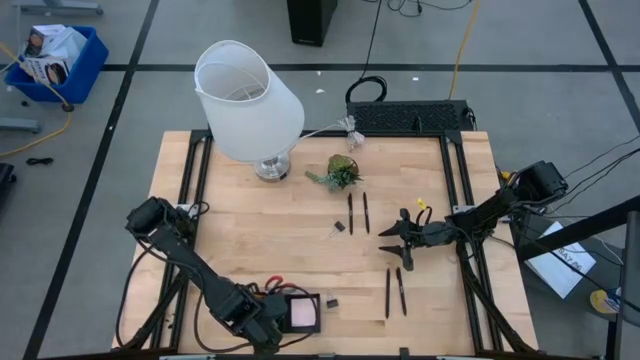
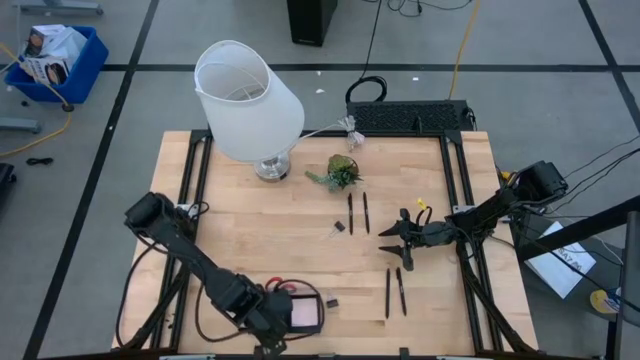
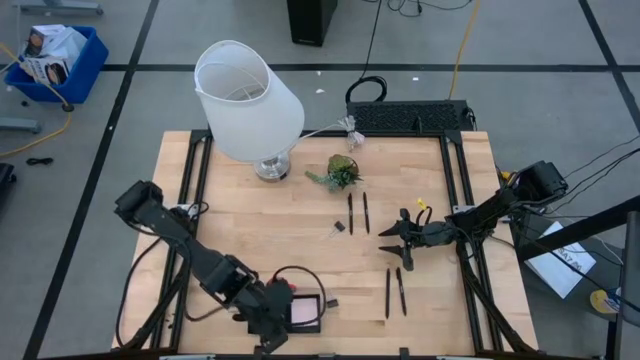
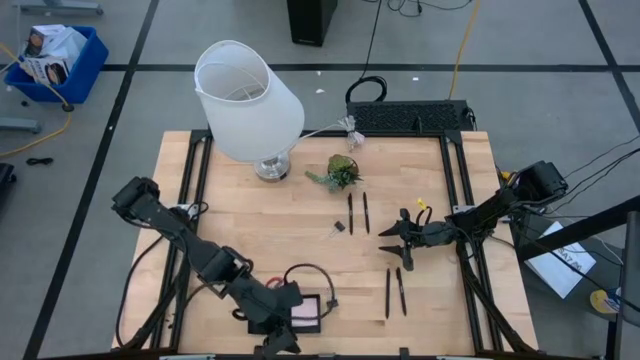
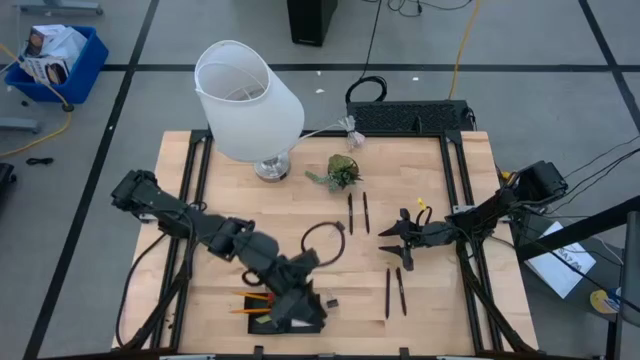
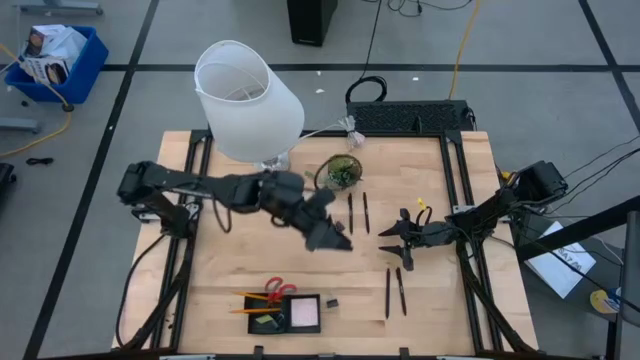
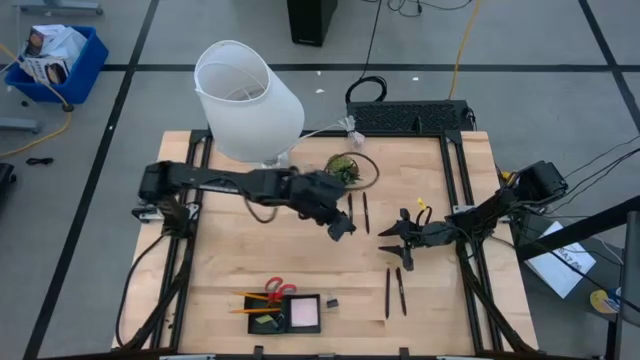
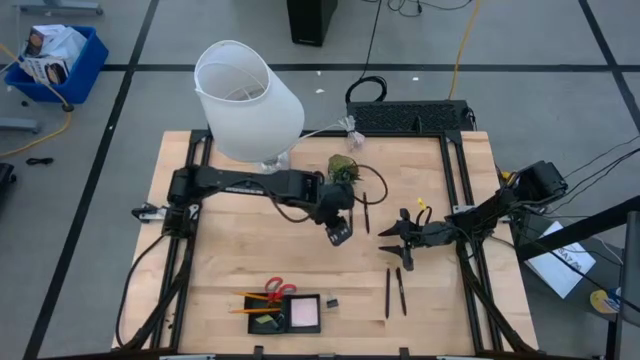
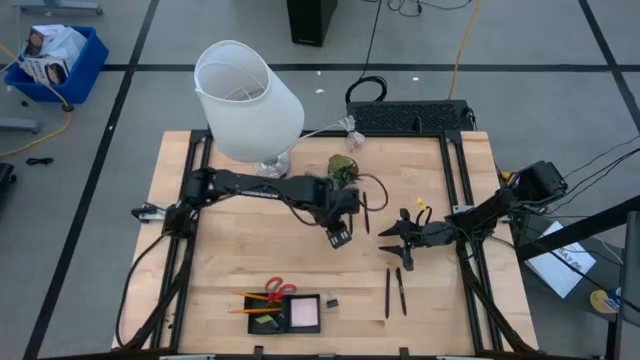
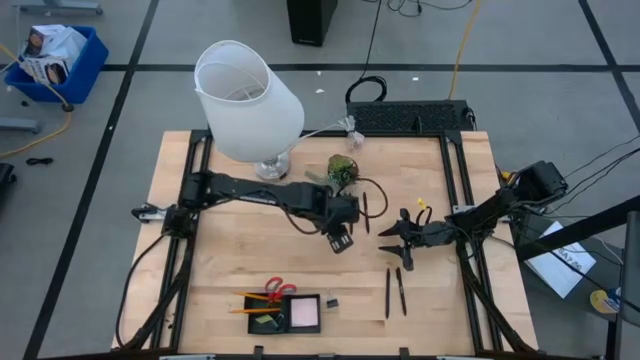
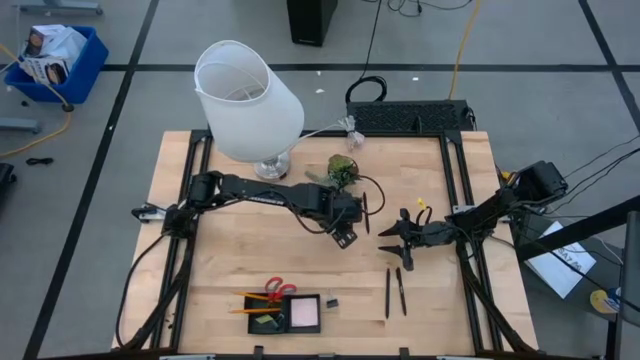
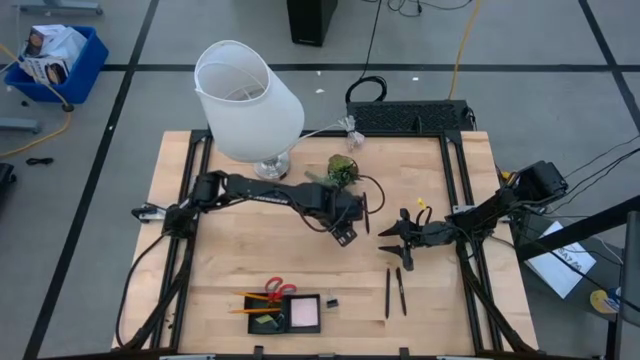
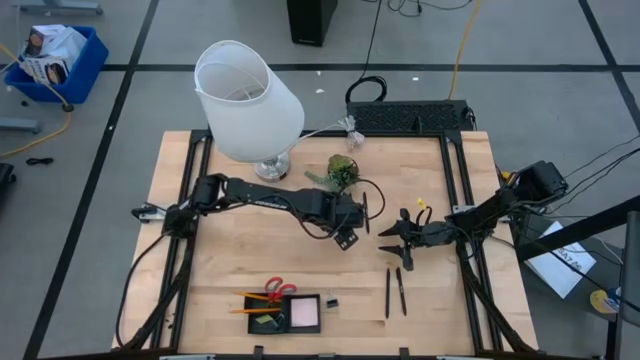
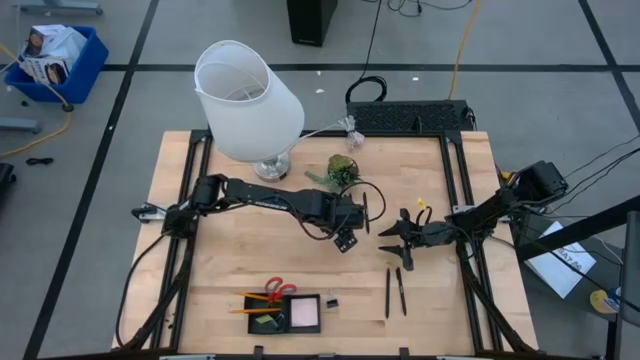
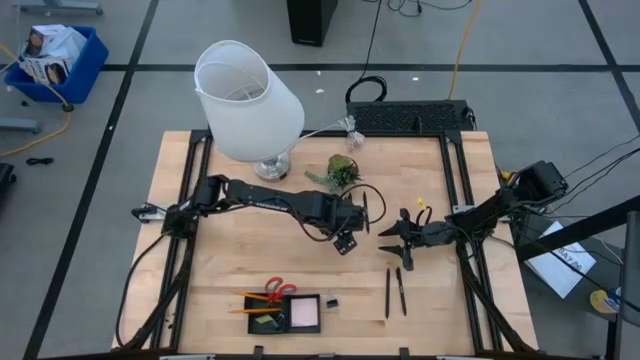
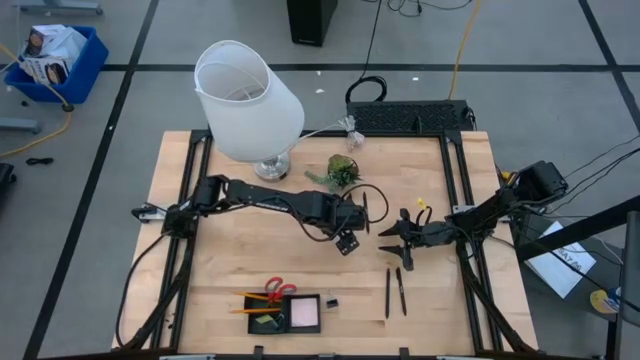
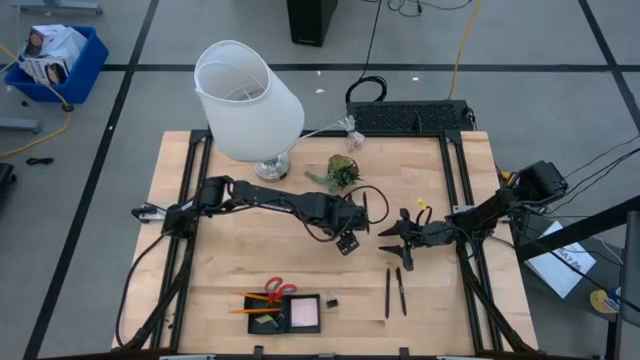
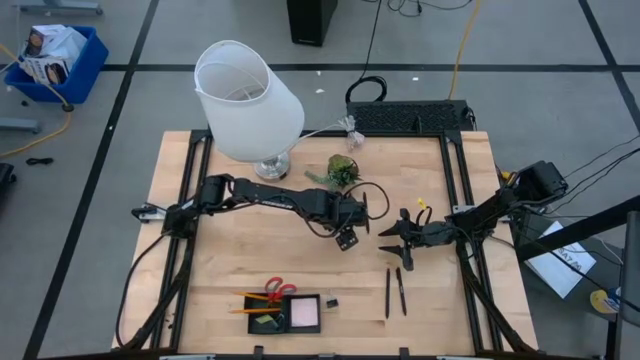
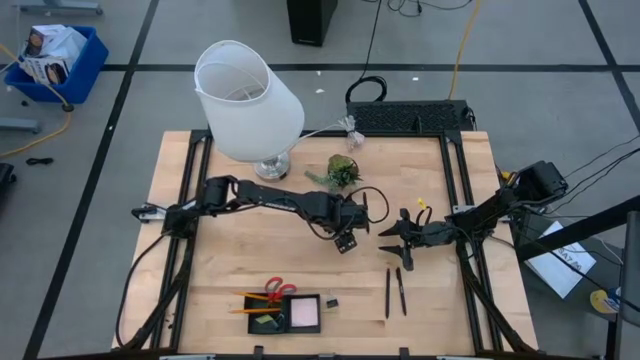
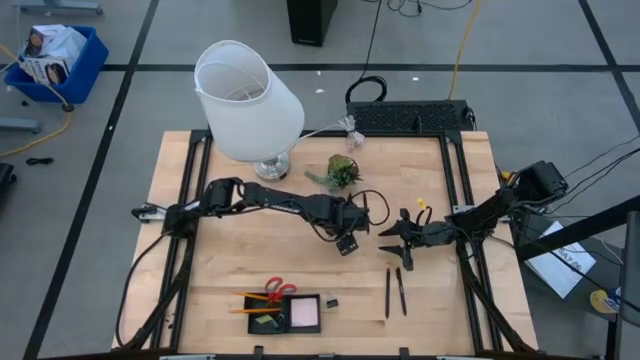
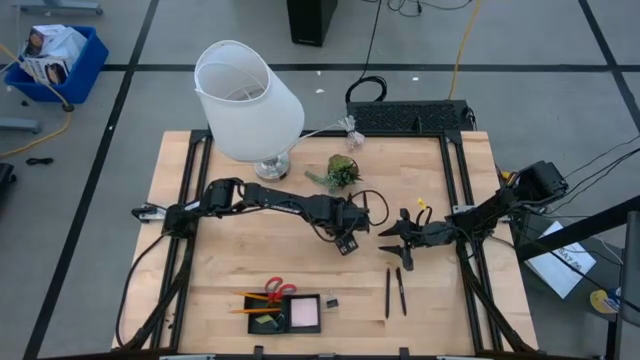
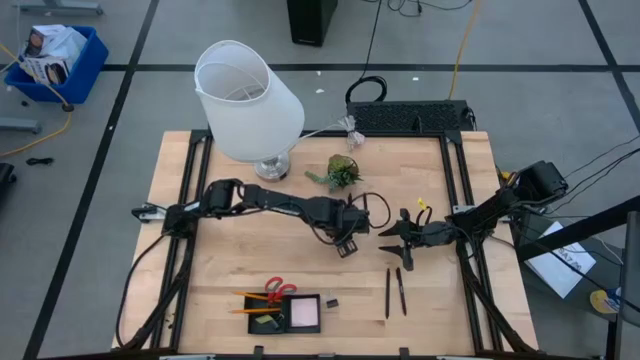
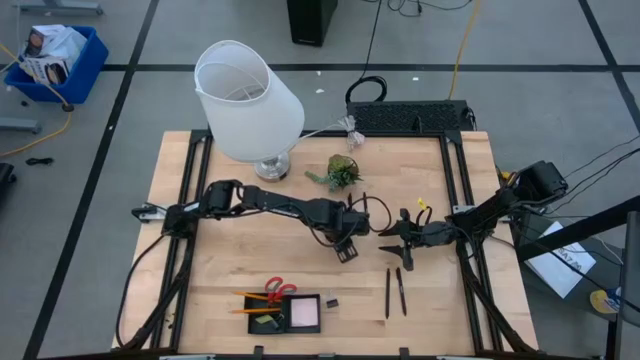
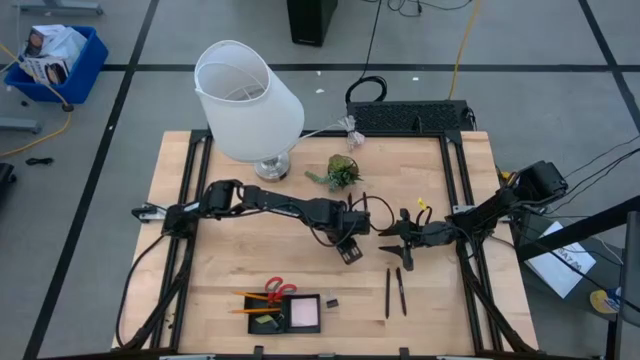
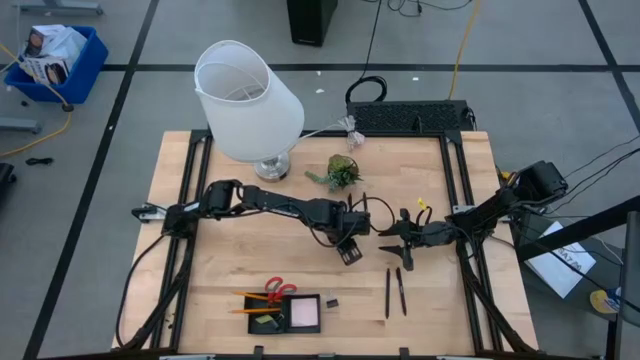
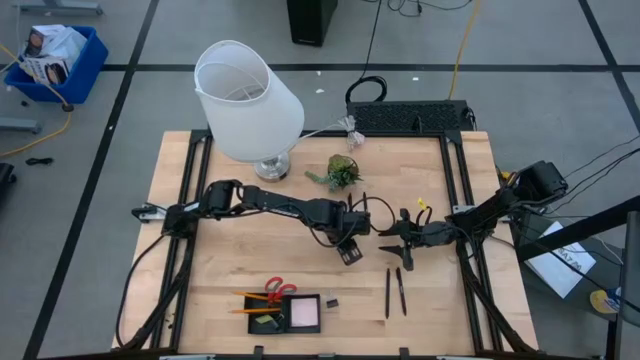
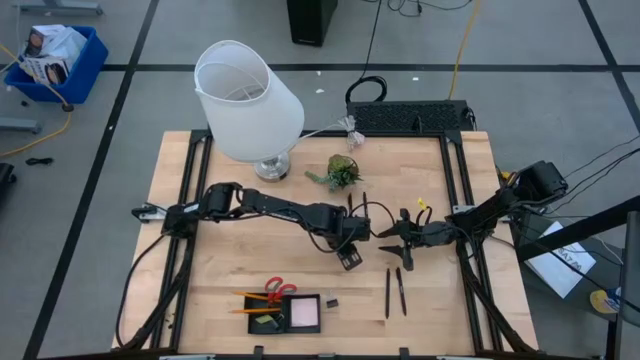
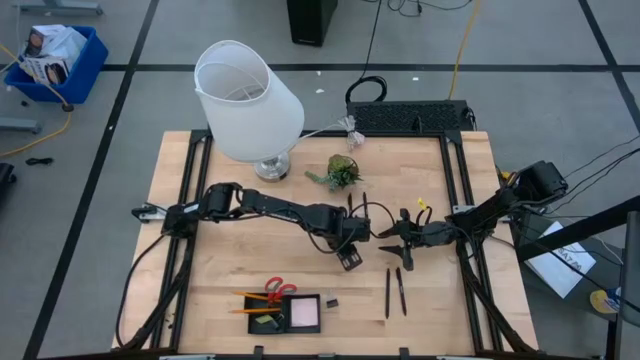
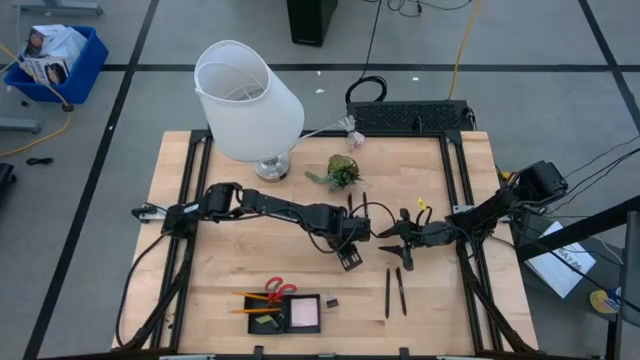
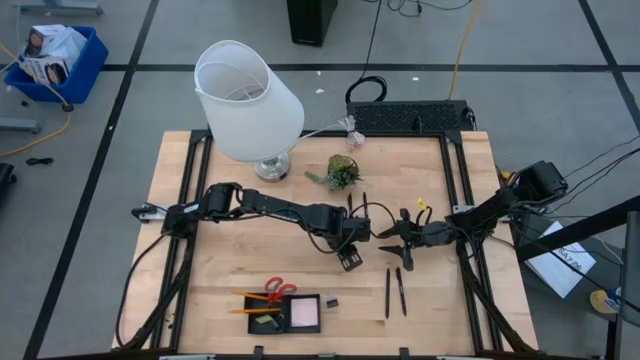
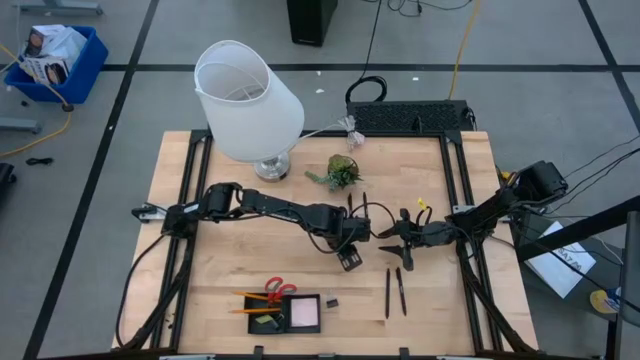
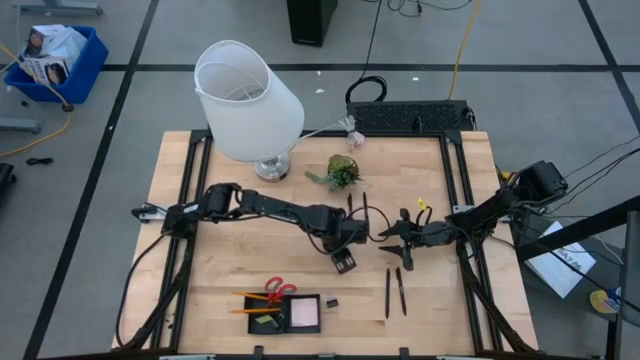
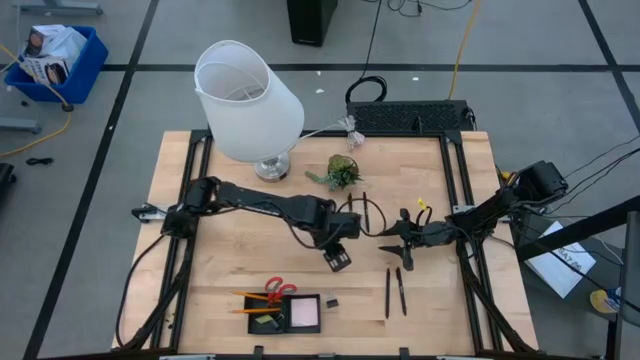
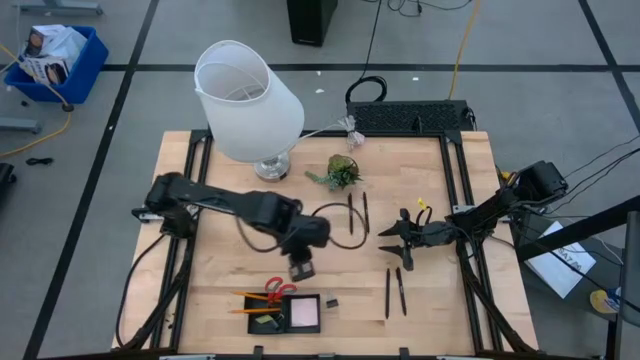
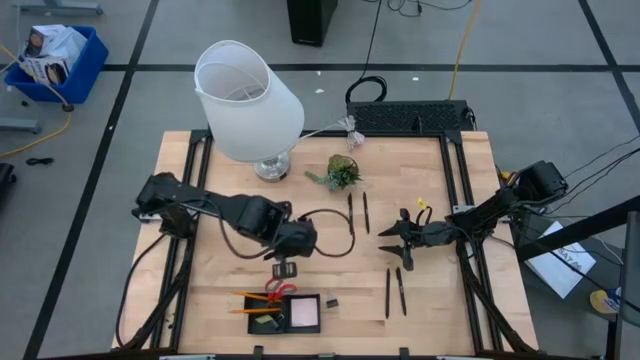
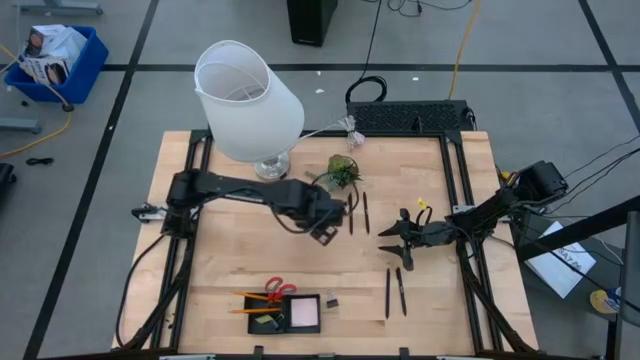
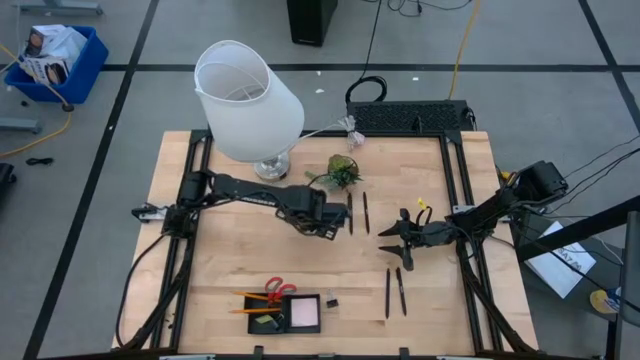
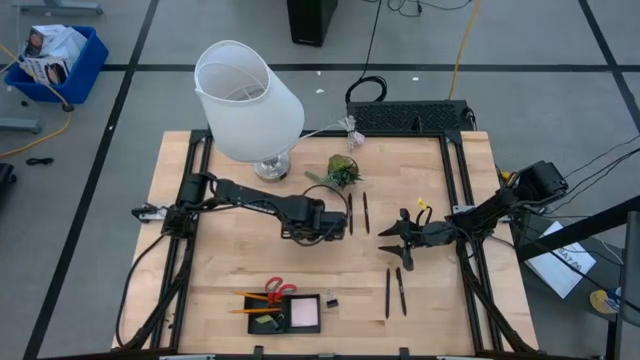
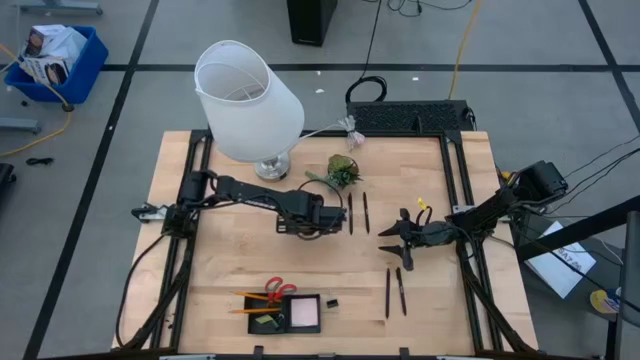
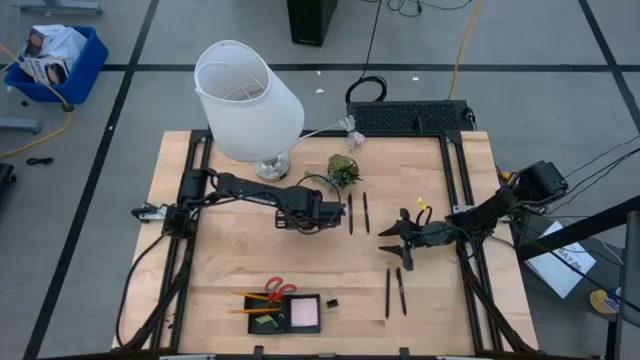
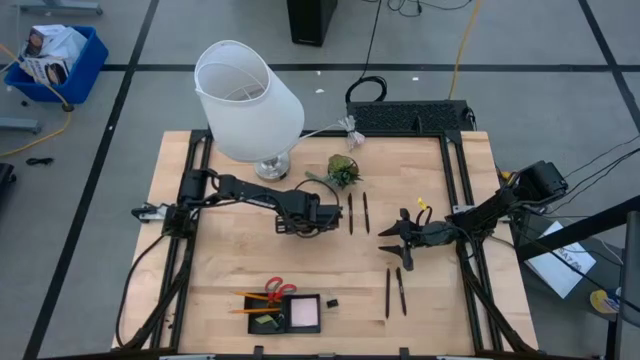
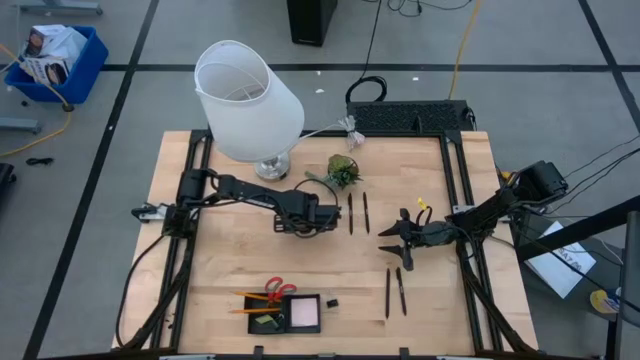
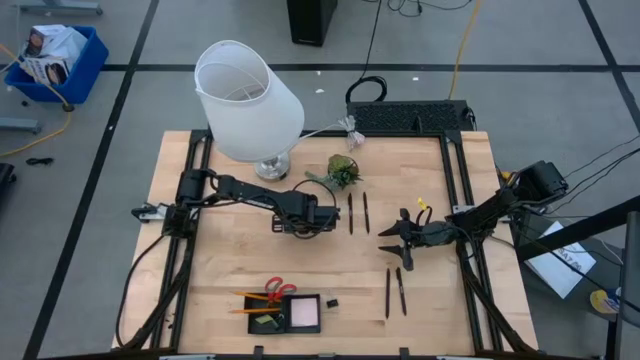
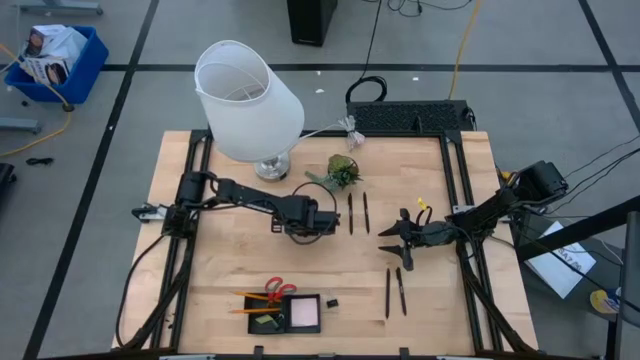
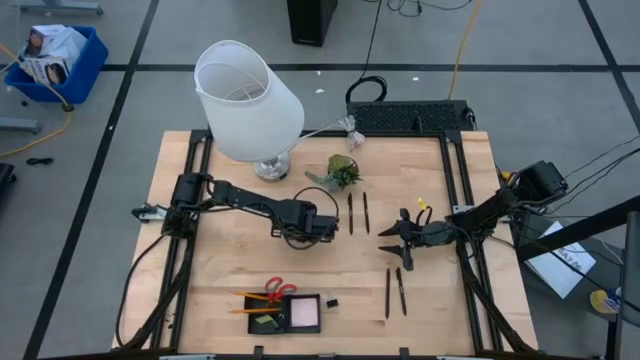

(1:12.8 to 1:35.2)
Task: Pick and place office supplies into organizer
Put the top black binder clip into the mesh desk organizer
